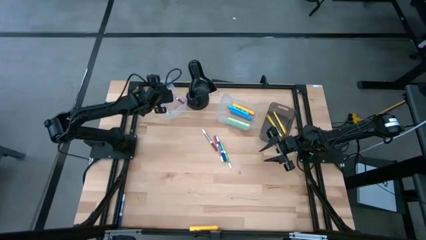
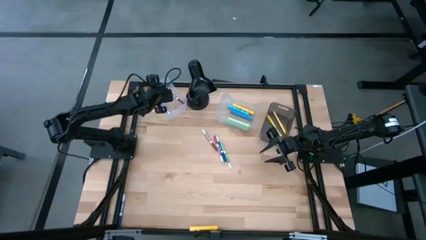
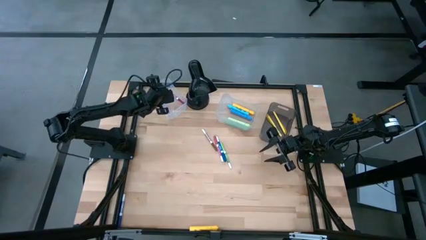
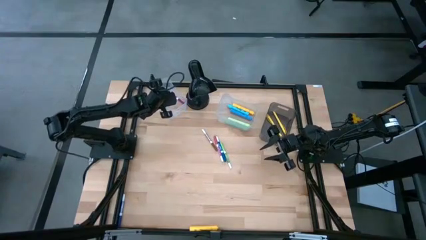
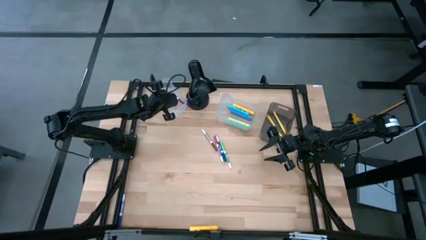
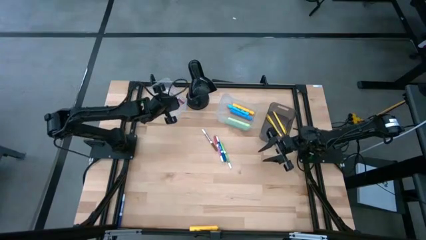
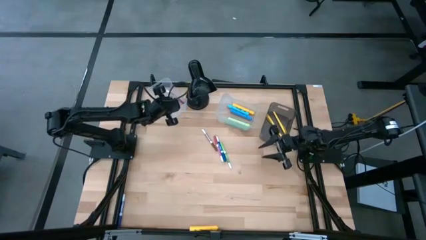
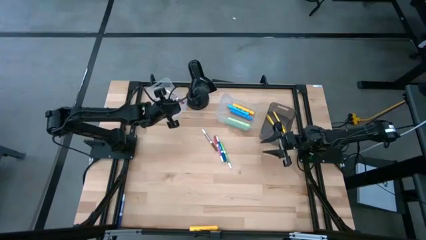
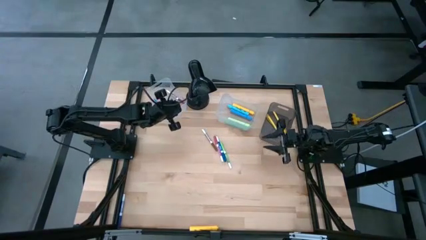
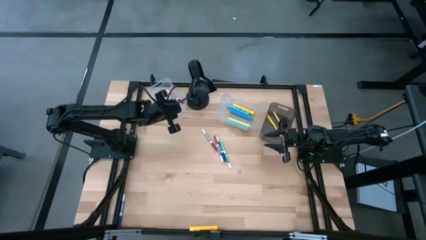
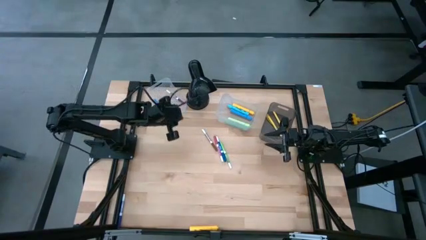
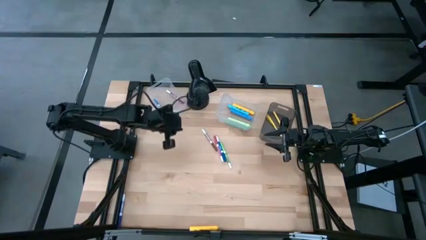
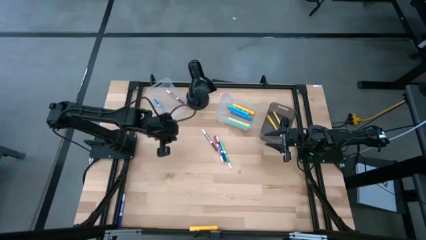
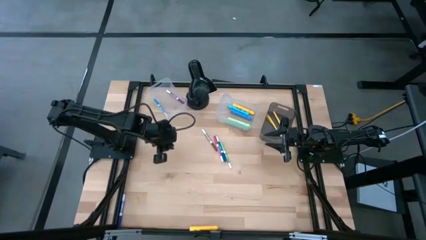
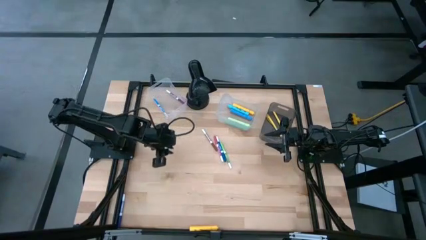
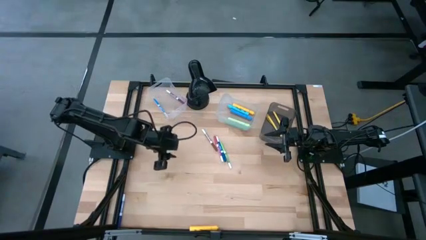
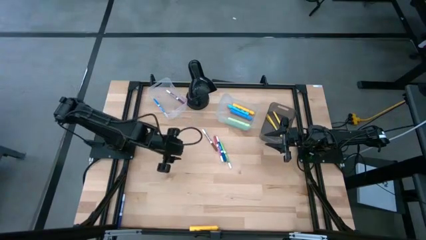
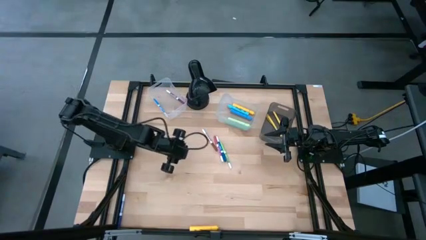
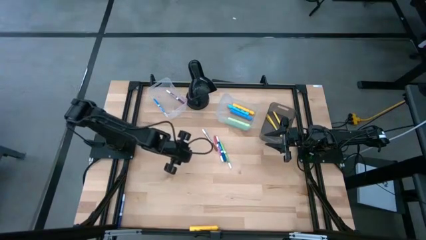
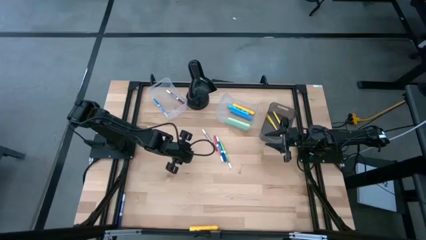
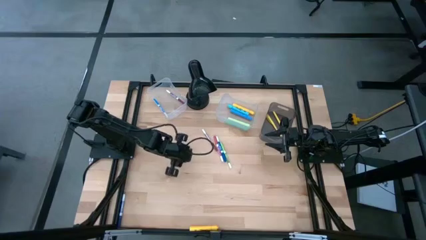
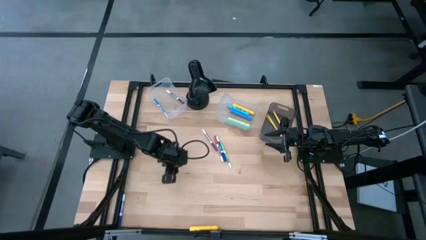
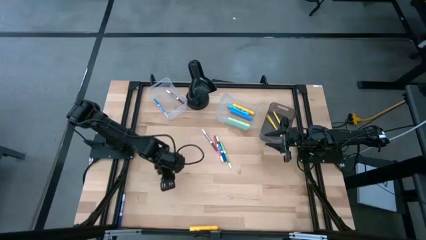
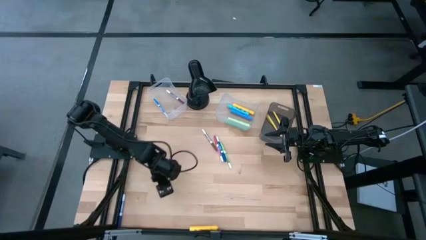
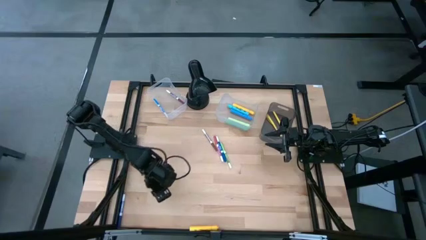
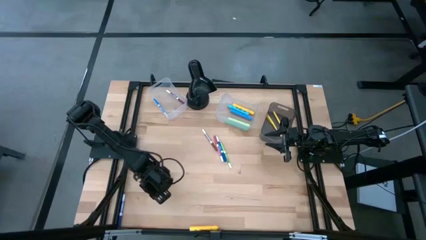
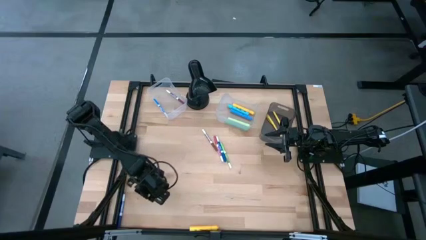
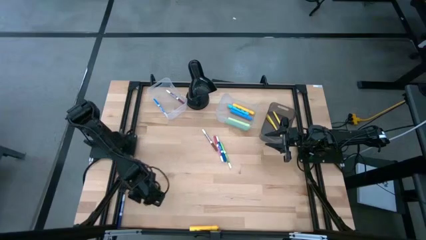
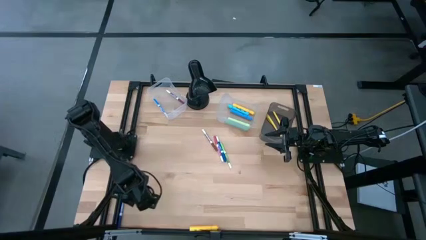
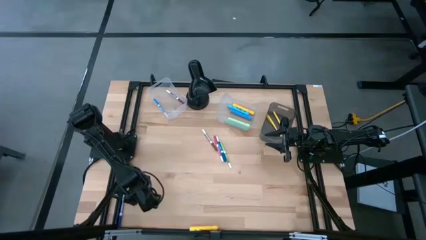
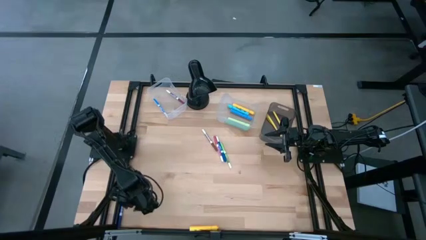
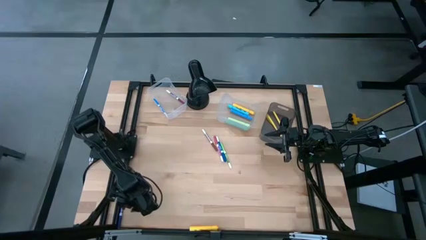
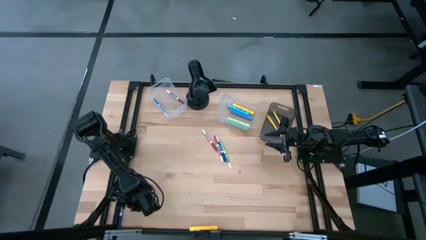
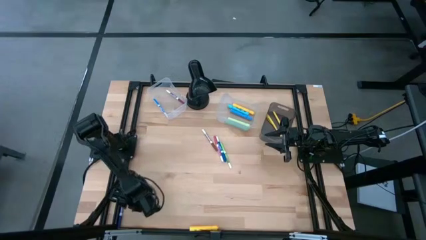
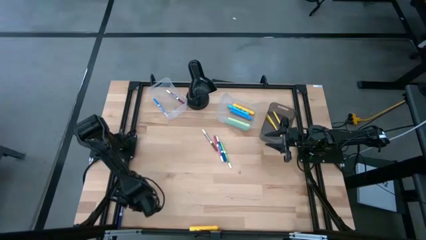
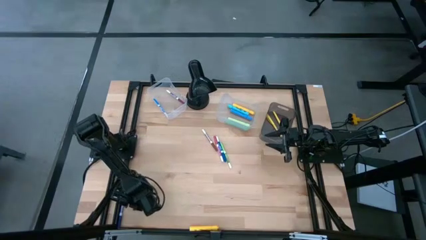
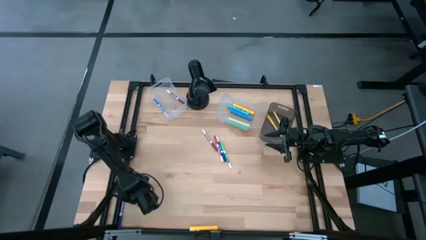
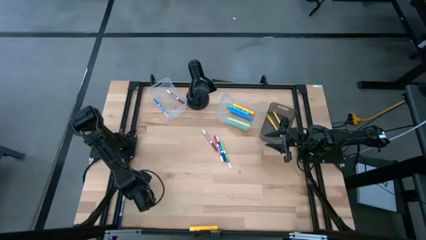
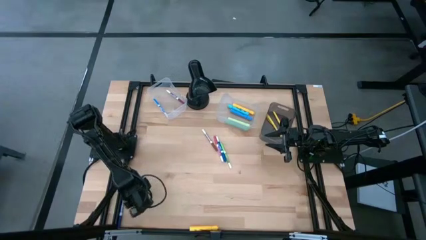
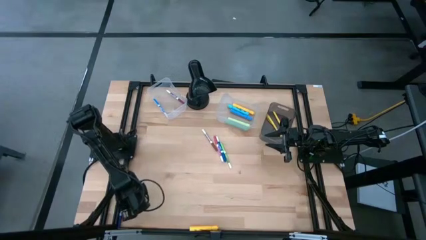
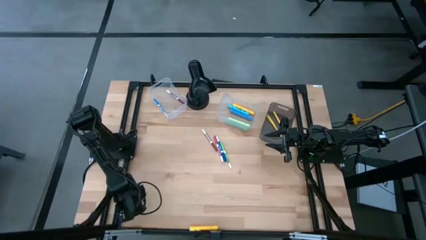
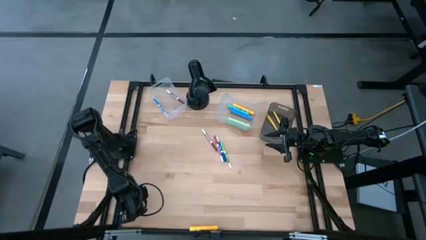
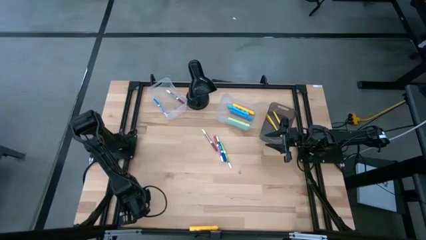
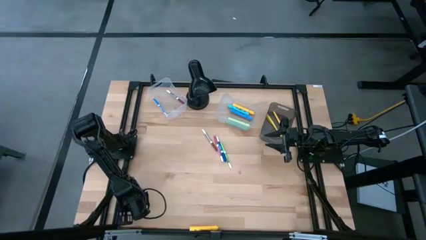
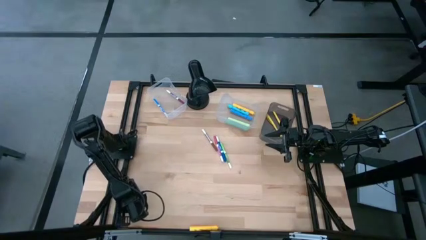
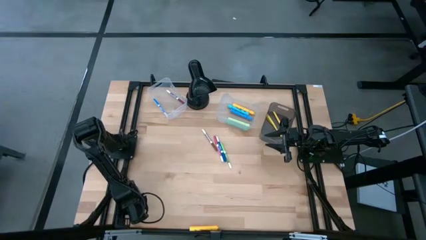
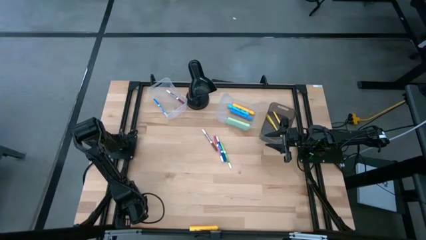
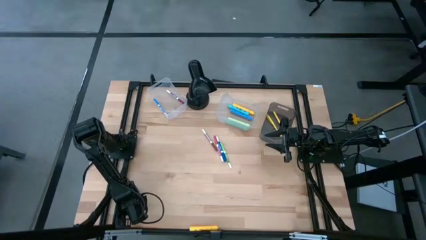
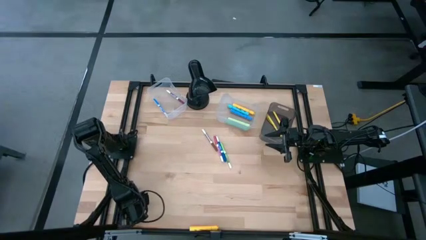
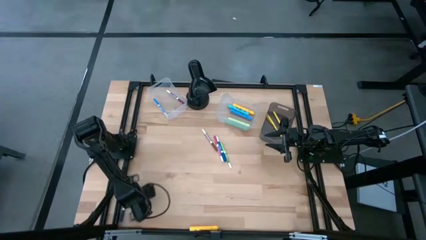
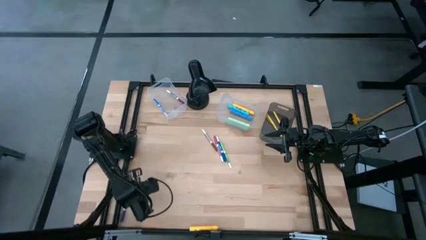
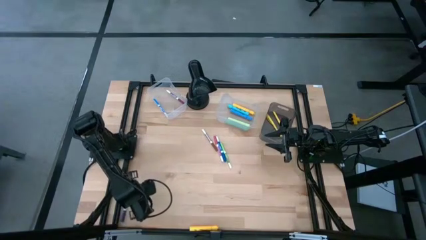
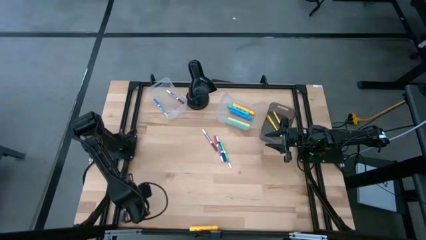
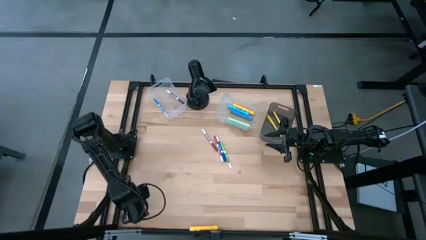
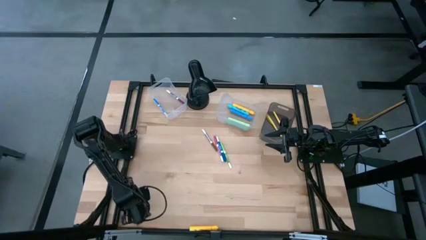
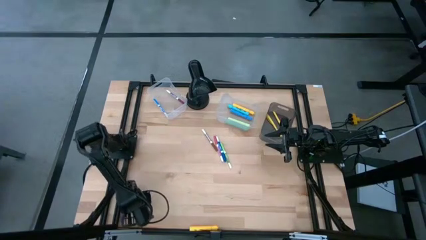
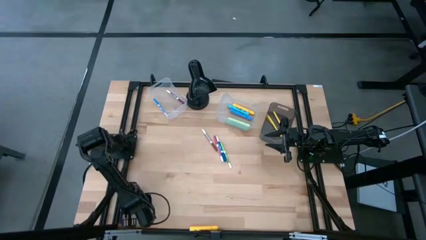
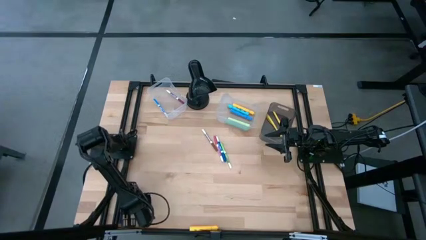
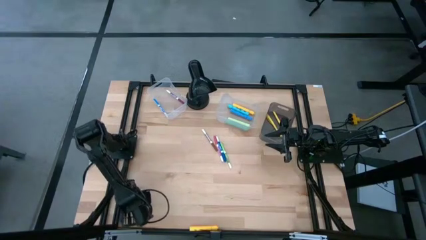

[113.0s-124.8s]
Task: Pick & Place Markers
Put the bottom blue marker in the left transparent bin

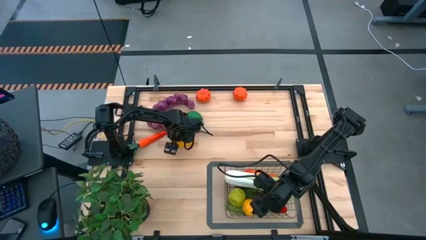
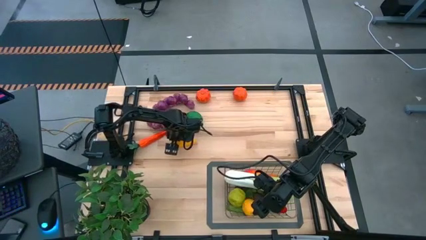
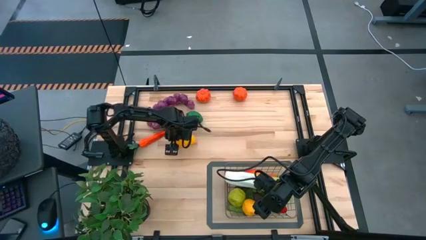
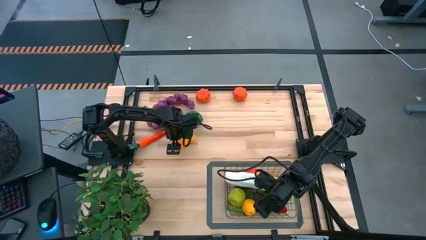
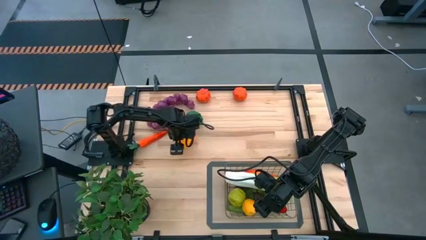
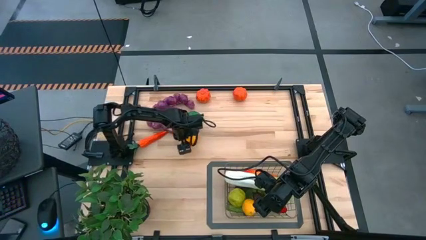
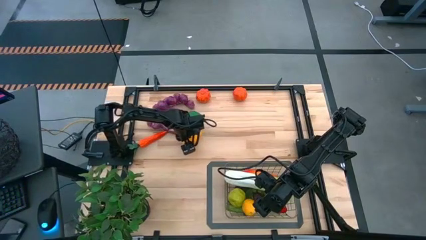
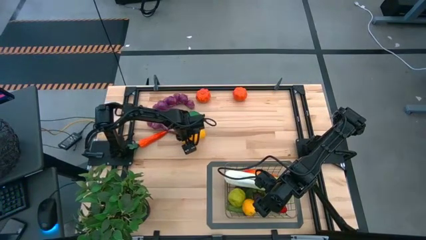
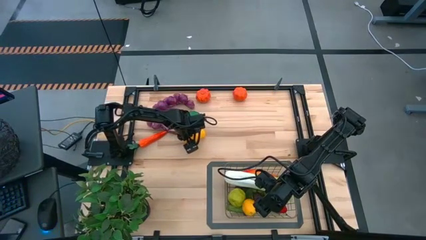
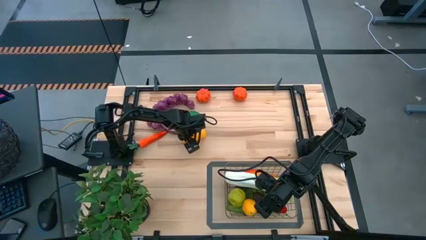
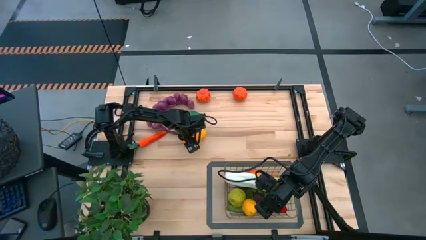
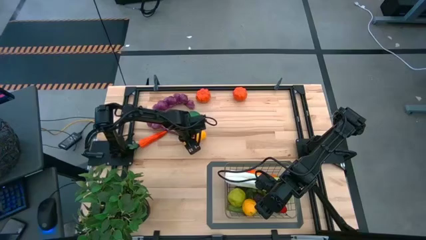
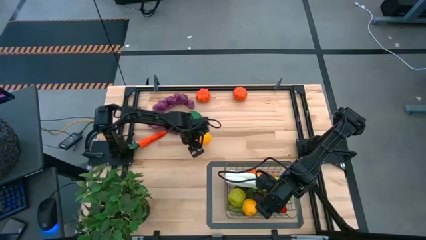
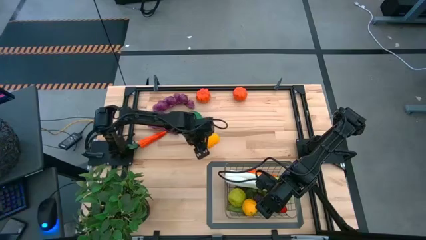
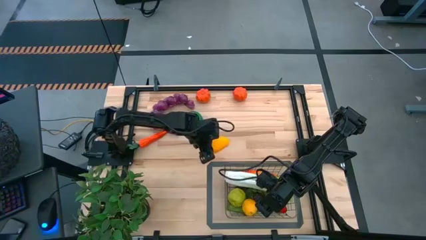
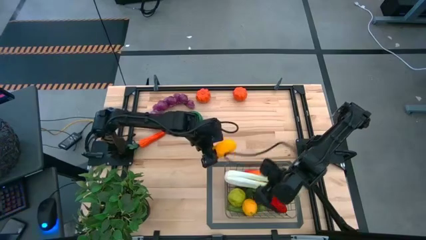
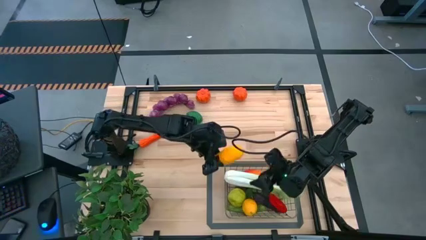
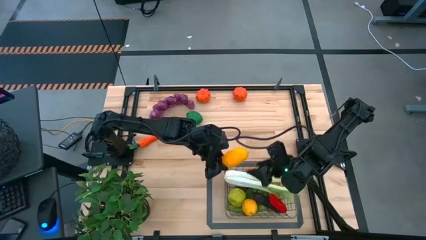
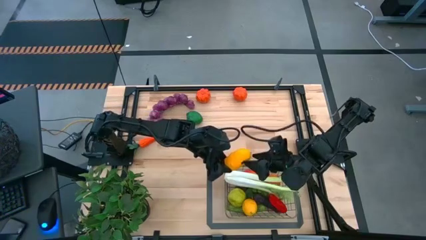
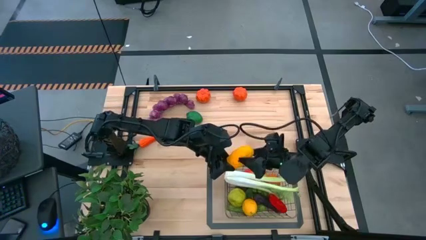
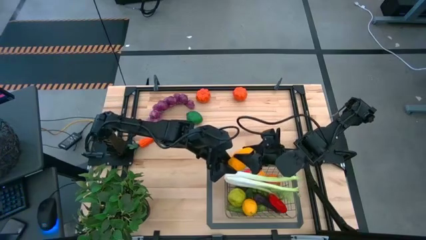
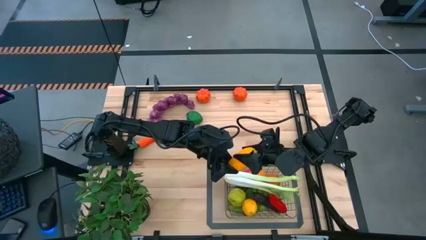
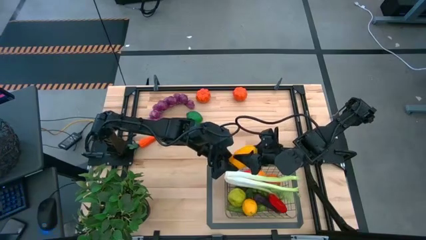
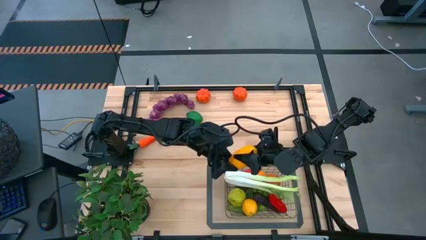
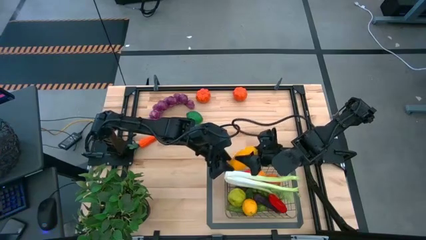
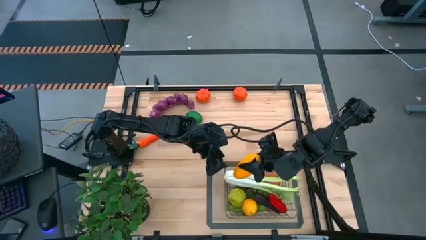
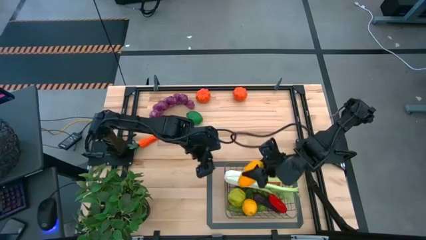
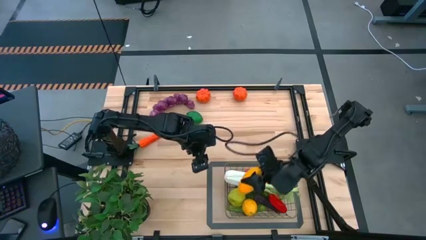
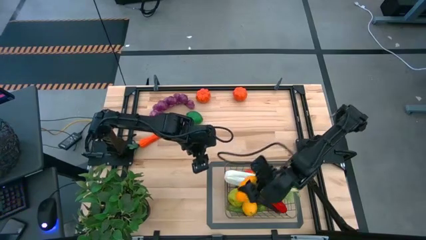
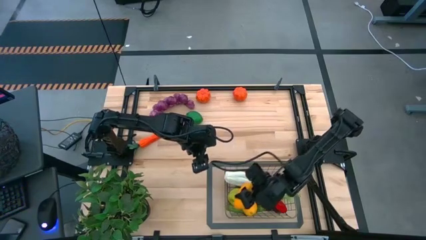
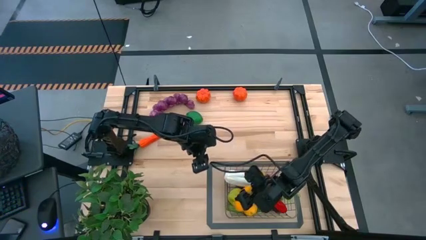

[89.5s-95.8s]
Task: Build produce basket
Put the yellow mango into the wire basket
